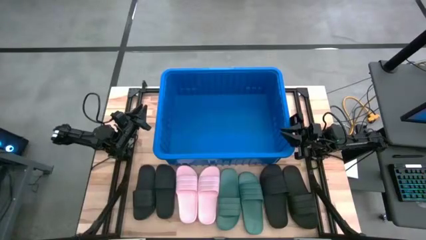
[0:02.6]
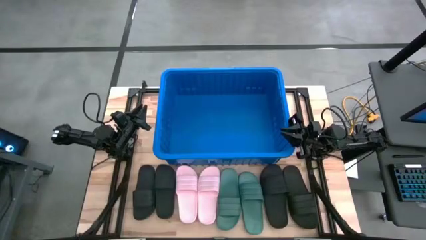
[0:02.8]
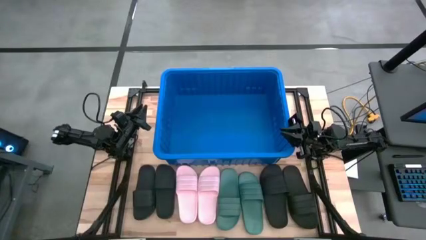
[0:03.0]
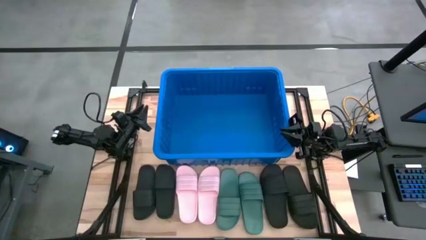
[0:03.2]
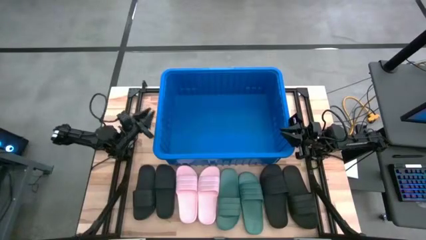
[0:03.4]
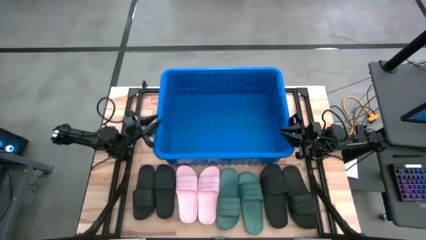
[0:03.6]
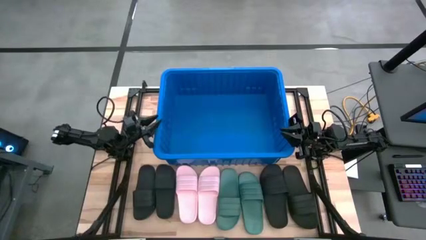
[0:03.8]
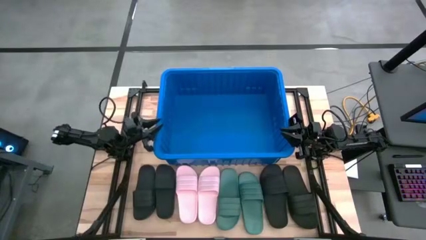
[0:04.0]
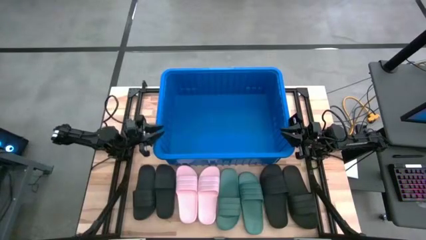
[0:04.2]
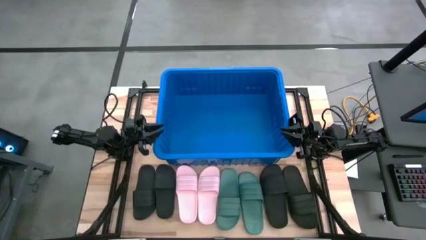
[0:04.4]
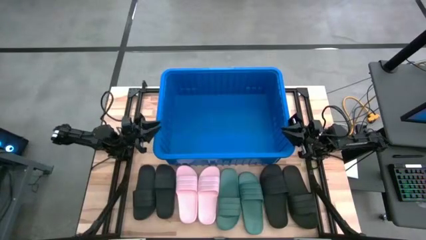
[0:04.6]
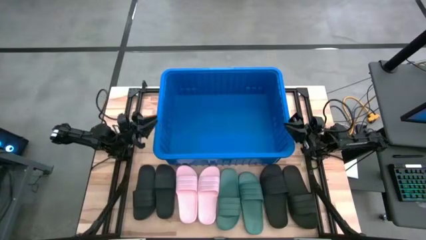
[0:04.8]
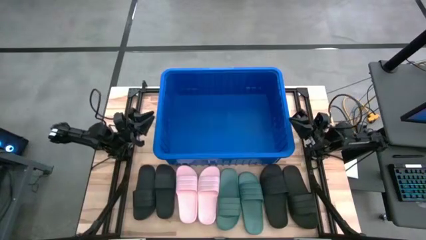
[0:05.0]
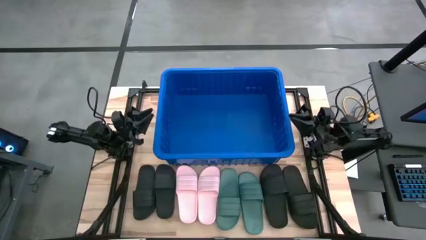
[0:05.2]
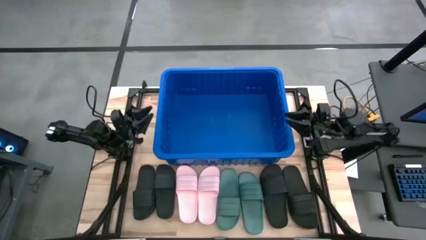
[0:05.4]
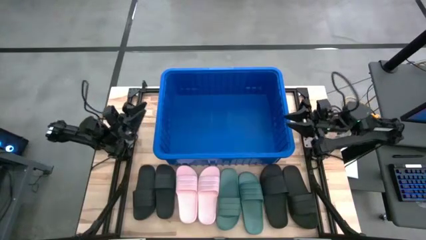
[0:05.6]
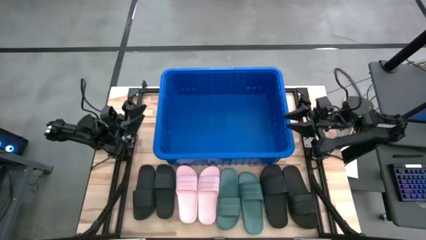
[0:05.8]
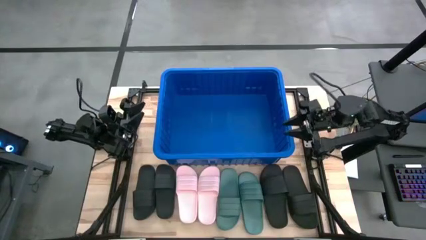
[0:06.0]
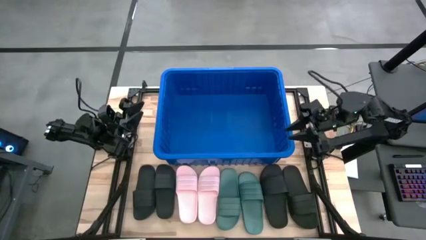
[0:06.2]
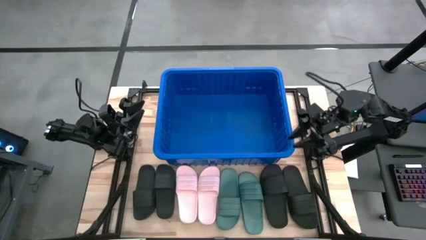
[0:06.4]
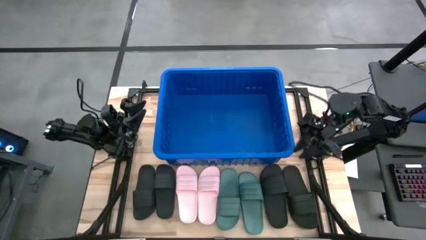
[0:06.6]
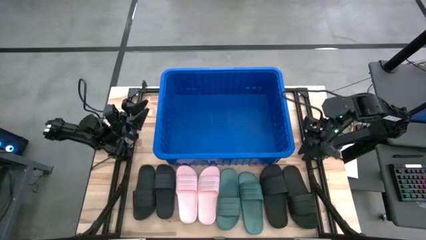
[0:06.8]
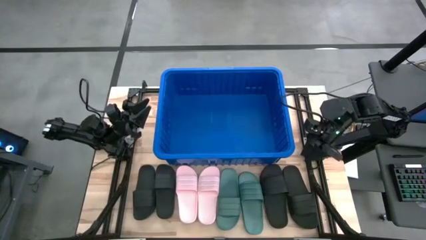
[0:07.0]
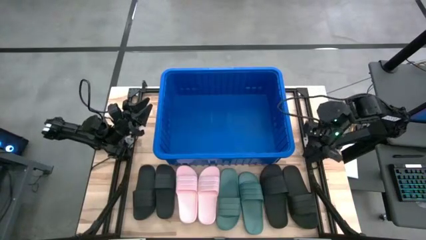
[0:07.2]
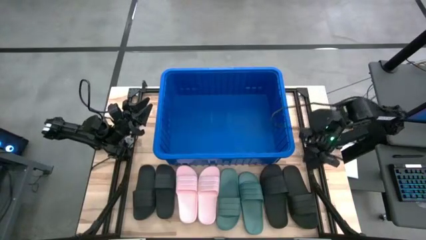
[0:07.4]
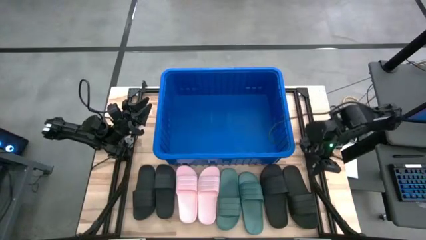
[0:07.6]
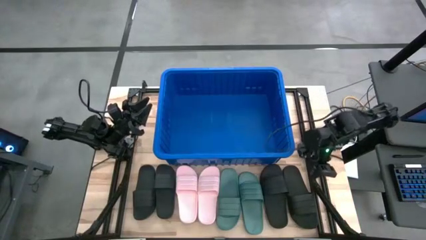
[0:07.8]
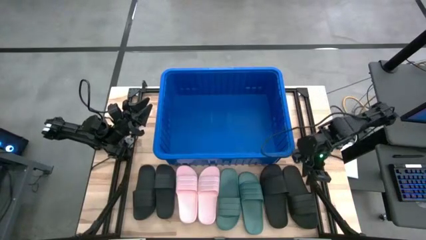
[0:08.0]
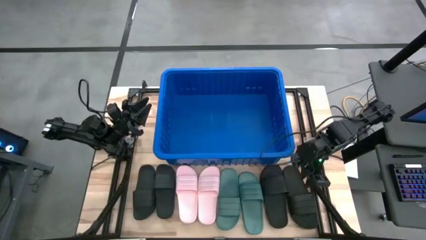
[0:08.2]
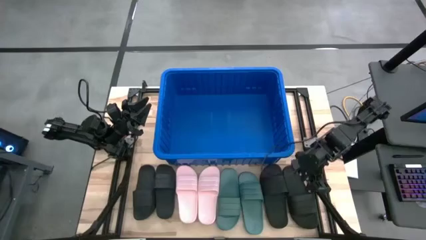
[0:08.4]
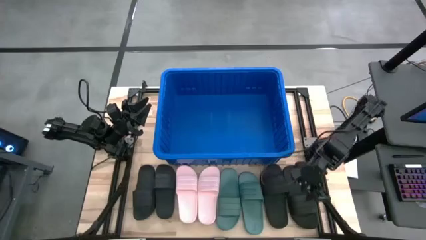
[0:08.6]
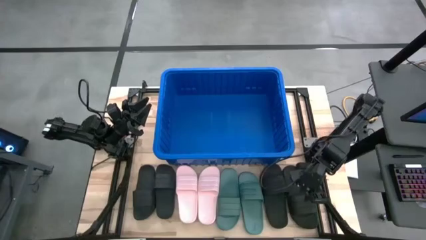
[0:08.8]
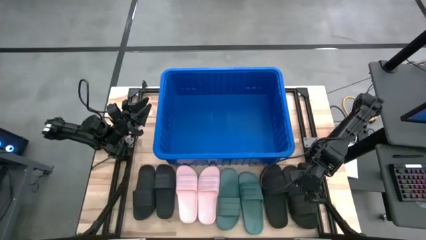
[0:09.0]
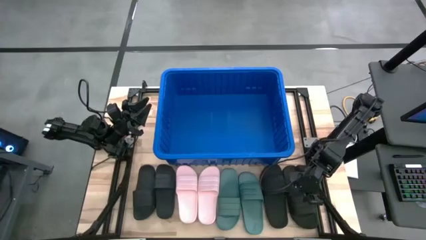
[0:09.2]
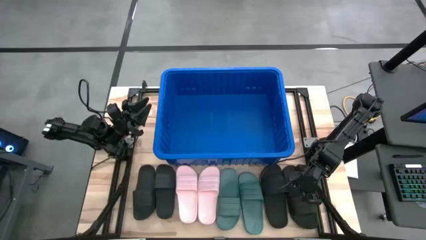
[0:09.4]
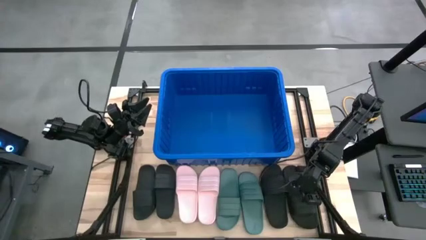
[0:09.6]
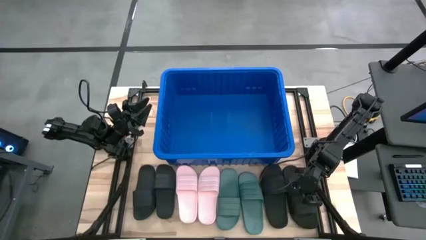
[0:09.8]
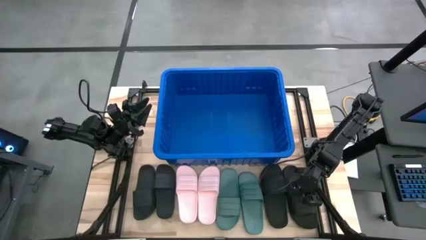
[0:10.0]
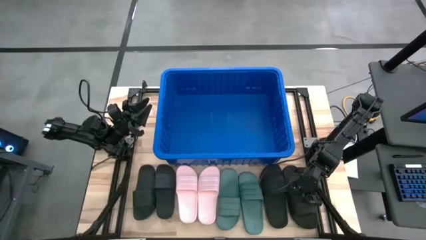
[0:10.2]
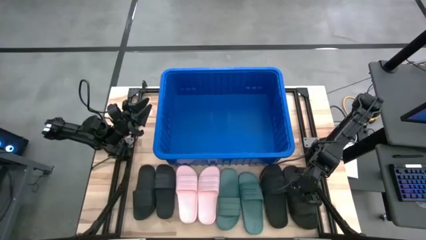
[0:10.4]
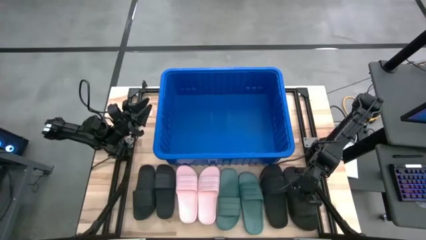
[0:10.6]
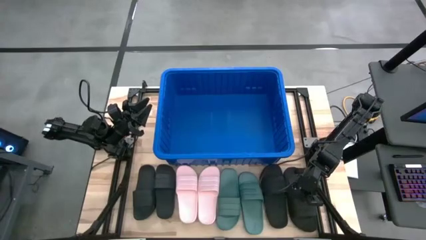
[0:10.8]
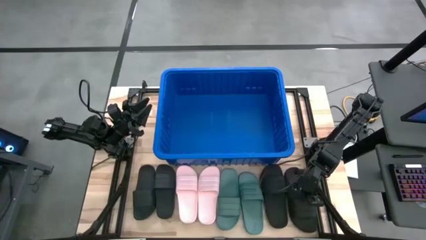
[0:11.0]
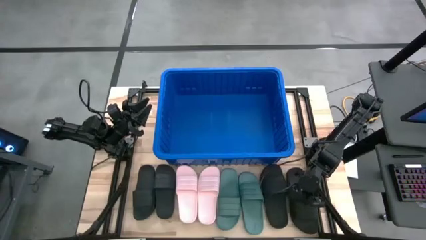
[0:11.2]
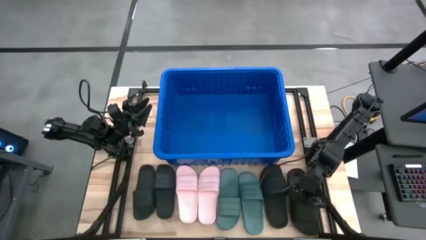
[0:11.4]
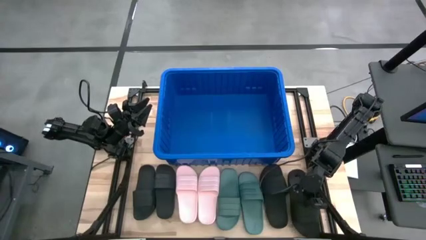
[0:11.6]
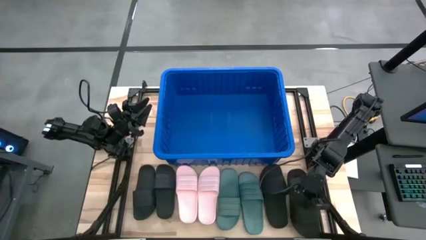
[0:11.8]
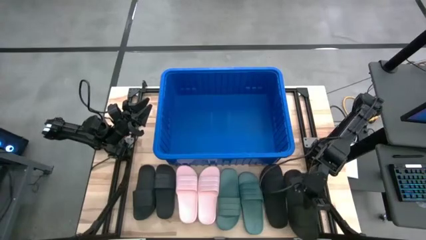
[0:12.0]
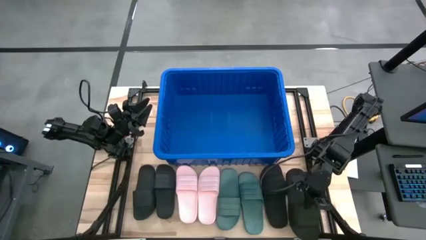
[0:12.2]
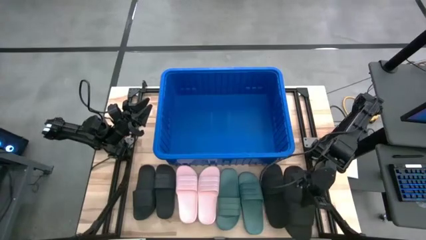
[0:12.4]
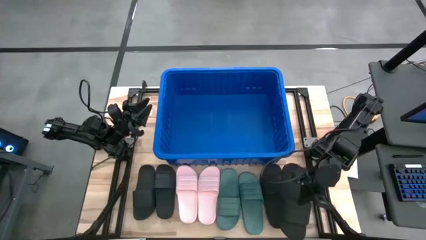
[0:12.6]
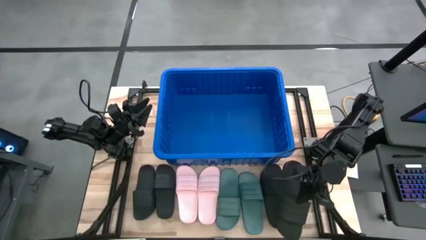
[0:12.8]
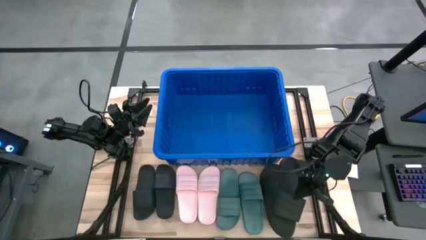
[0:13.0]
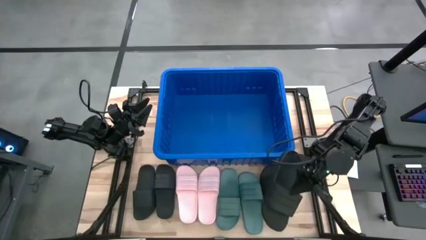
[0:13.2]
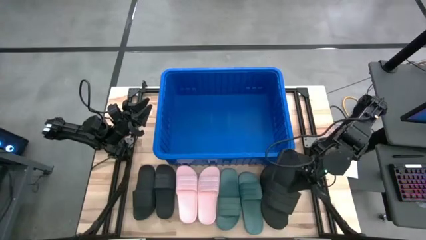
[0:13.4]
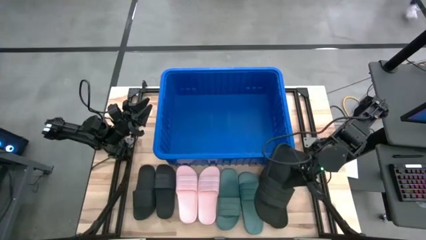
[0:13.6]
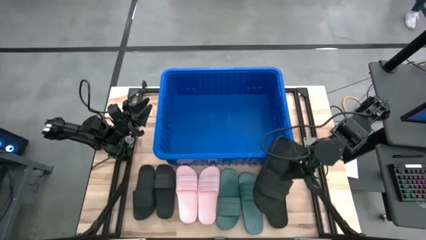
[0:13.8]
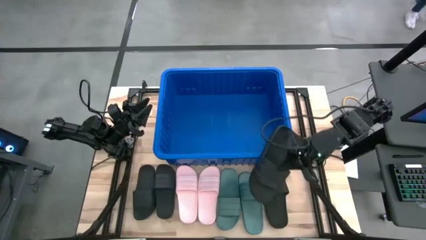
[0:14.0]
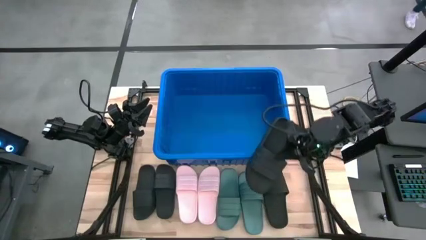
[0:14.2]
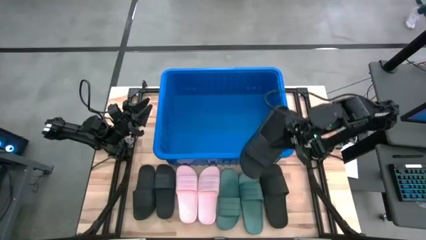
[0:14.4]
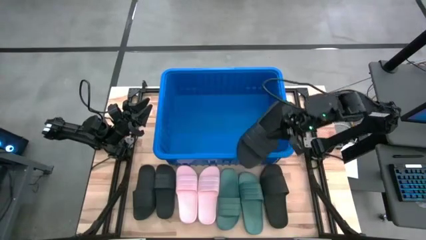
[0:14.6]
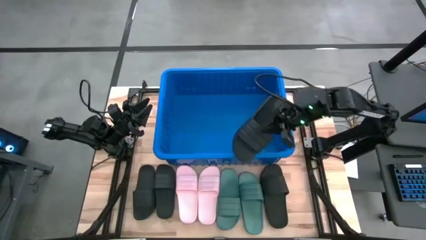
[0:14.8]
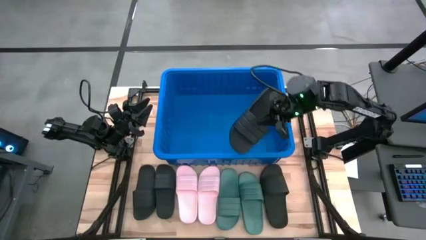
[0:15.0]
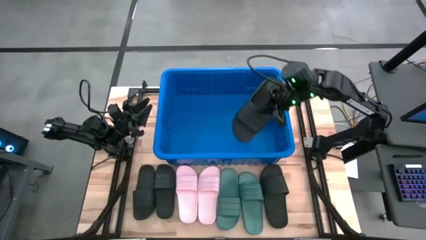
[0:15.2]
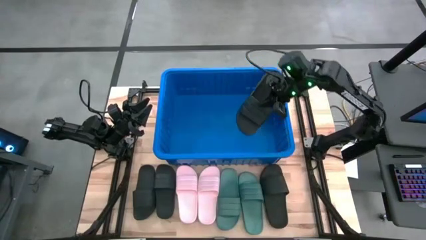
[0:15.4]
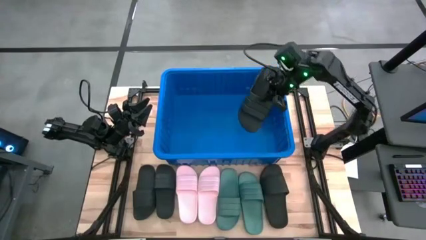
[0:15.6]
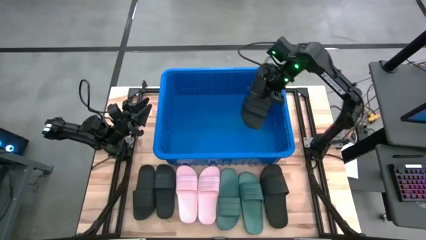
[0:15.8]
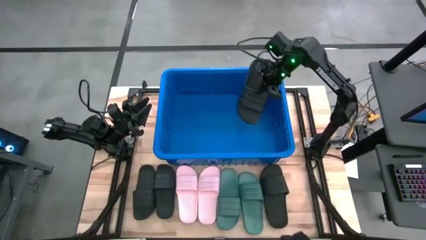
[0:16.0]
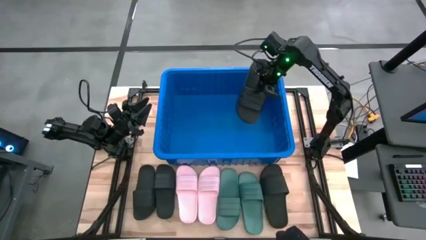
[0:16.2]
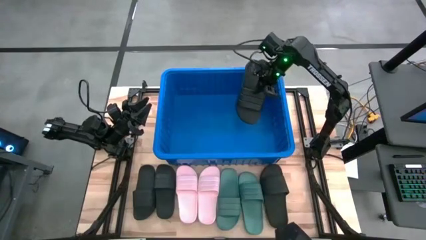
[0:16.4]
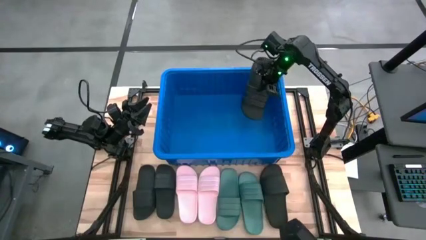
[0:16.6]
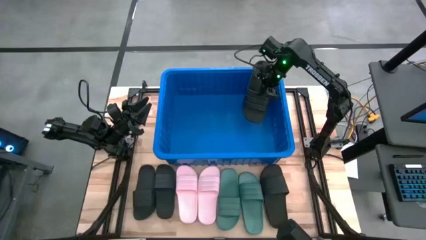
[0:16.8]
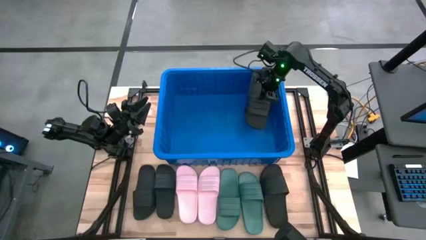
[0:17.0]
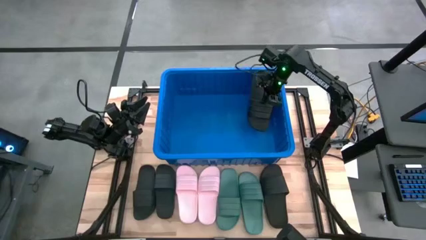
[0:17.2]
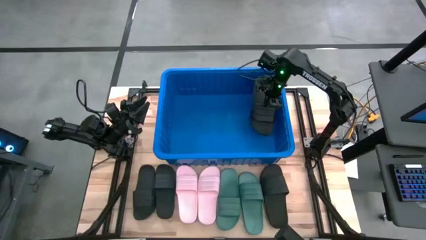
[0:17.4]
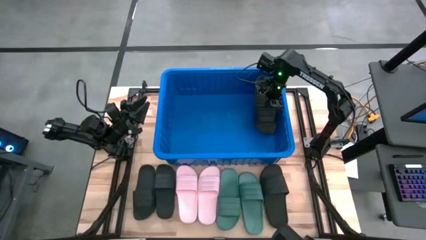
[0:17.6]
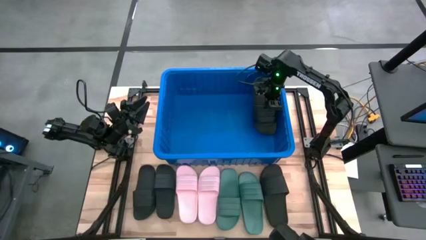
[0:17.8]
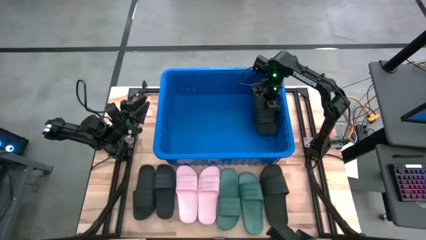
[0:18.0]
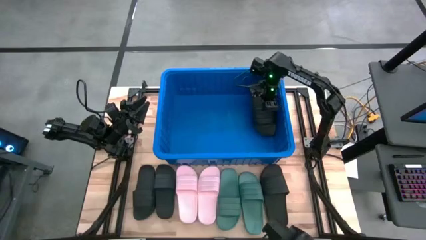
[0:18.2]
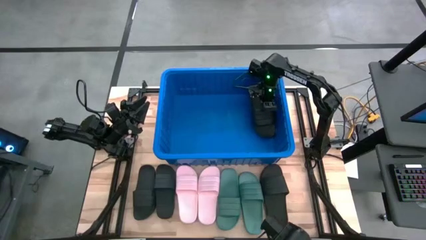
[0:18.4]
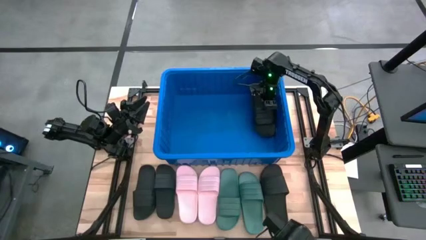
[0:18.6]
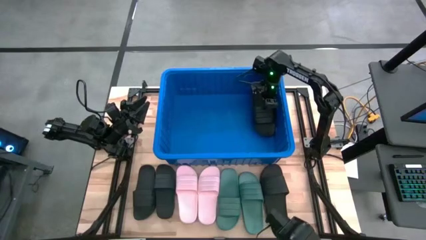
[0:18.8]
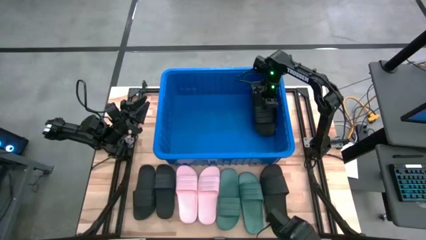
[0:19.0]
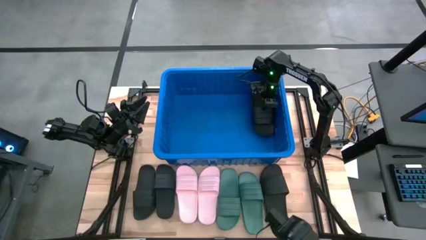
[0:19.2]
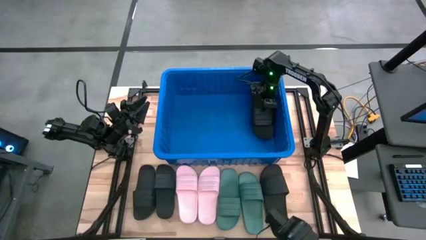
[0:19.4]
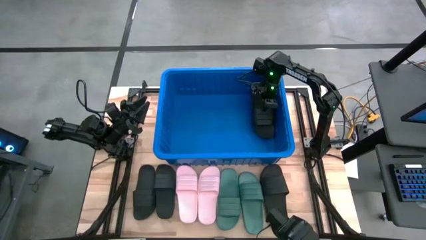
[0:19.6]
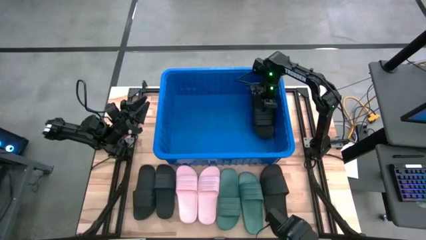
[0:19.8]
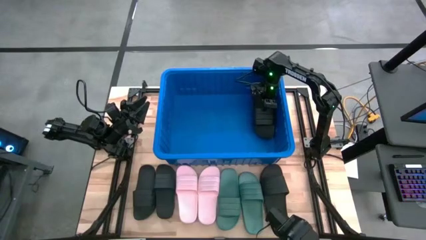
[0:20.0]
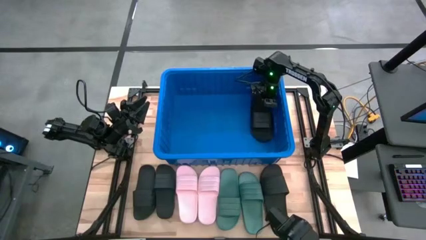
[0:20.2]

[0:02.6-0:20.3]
Task: Pick and place slides into bin
Put the black slide into the bin
